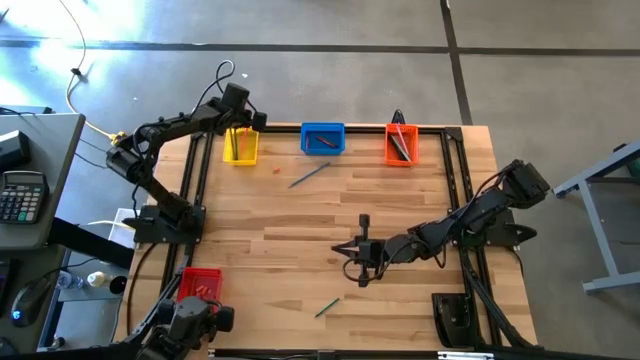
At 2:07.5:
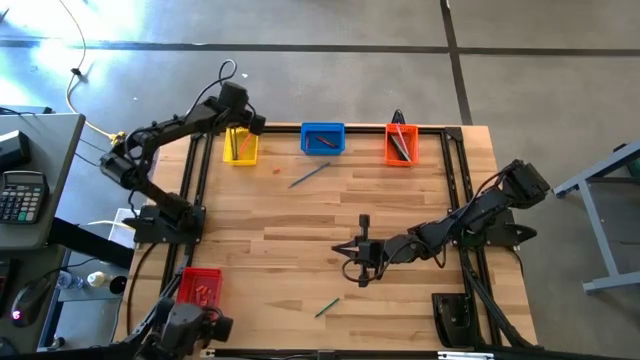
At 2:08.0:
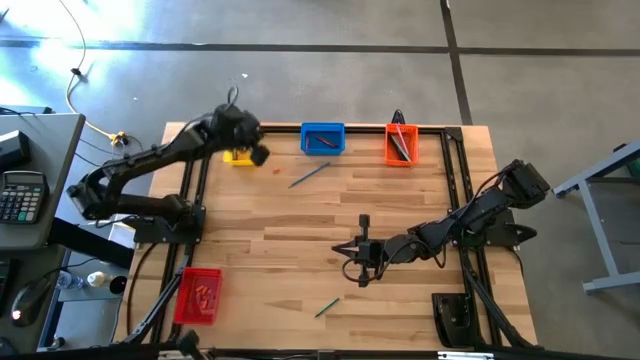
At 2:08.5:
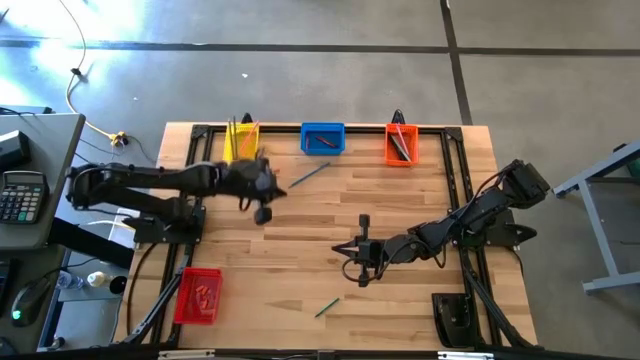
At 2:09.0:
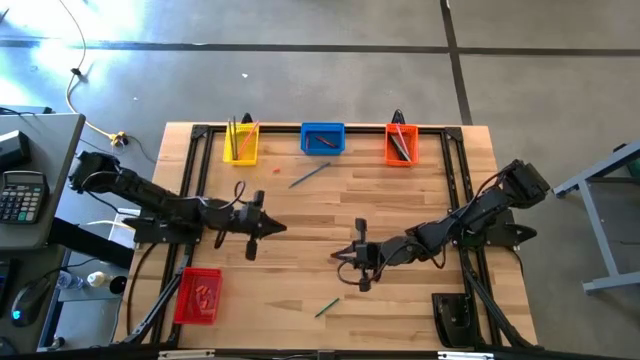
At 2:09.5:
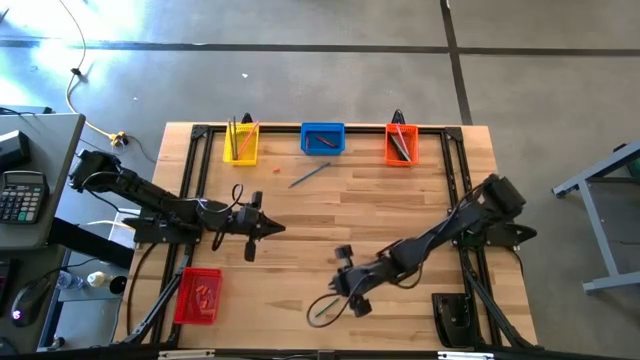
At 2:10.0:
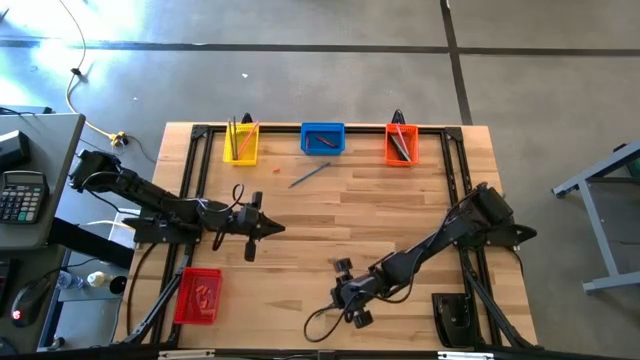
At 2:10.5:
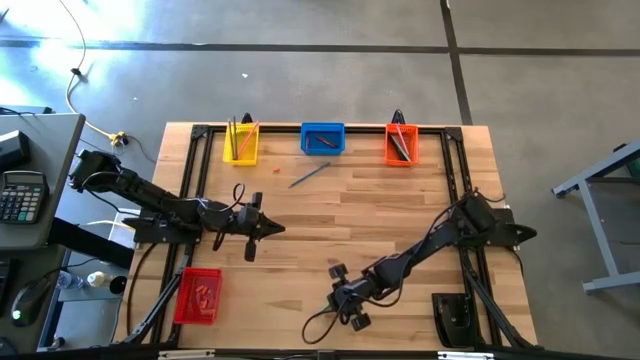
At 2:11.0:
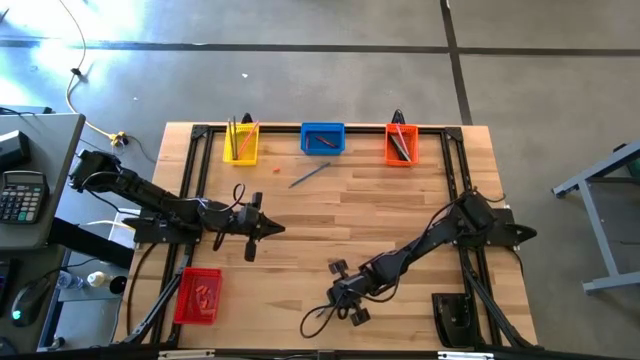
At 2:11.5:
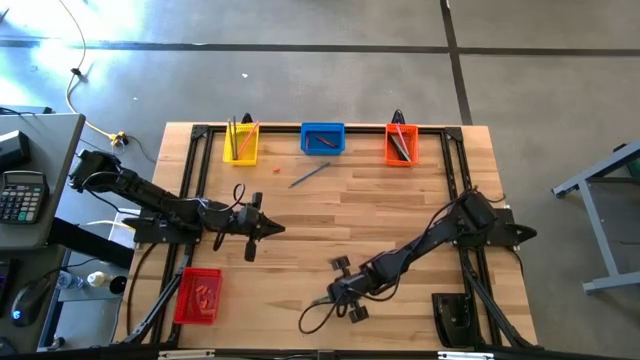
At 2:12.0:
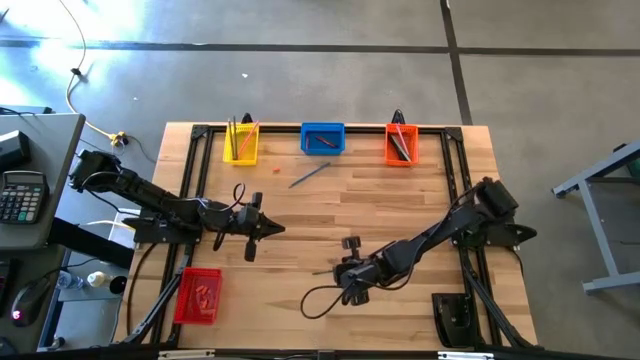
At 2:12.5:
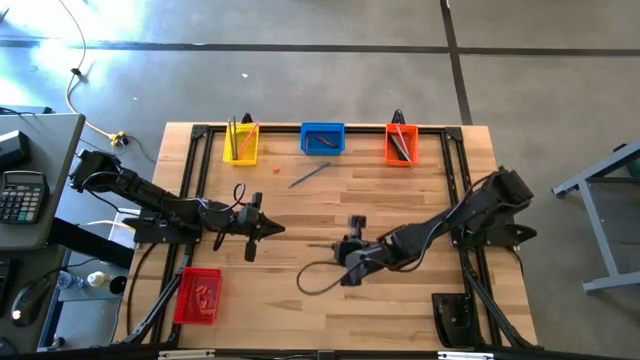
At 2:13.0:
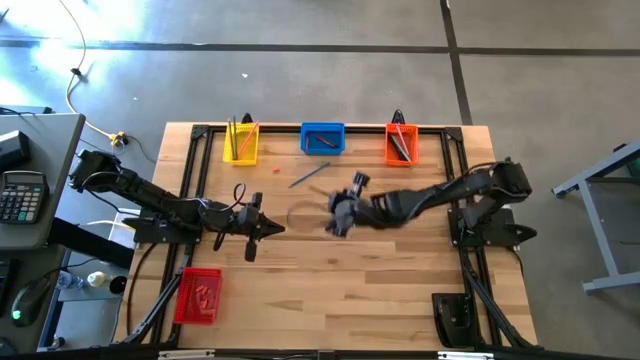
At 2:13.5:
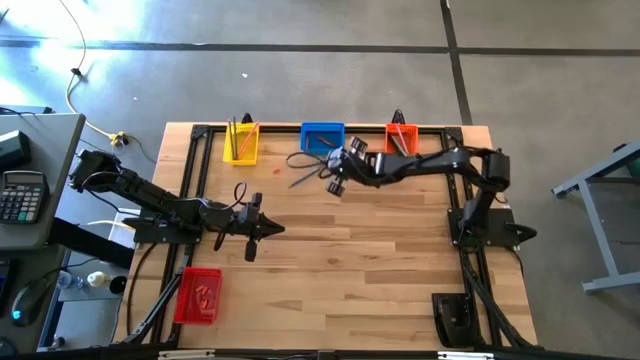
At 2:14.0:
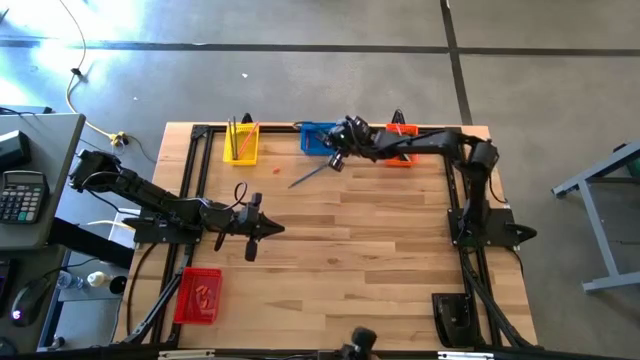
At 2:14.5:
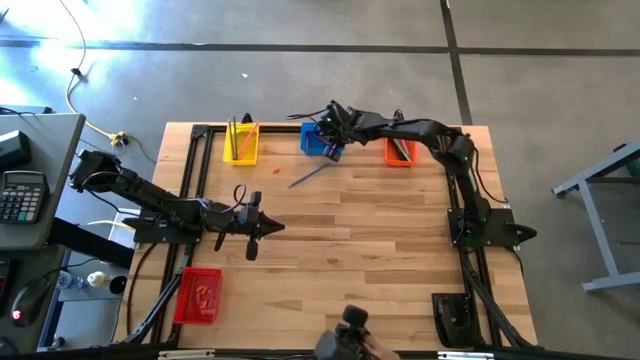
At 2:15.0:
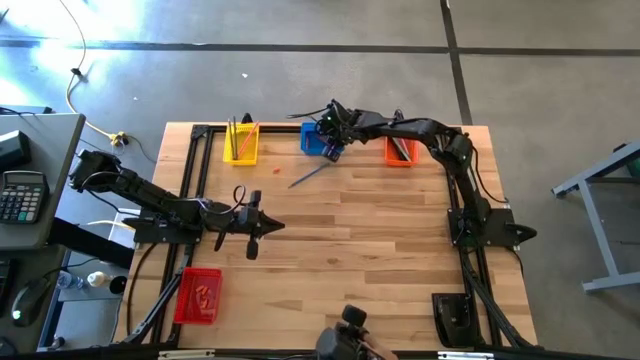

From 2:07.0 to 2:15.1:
Task: Sort crayons/erasers/pens/pencils in bins
Put the green crayon into the blue bin

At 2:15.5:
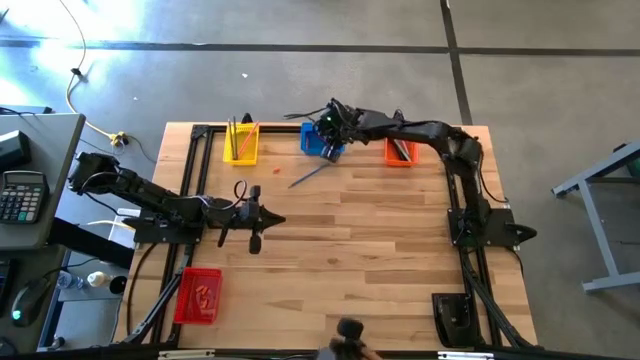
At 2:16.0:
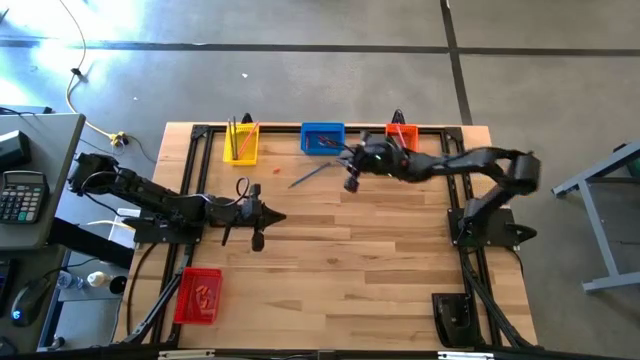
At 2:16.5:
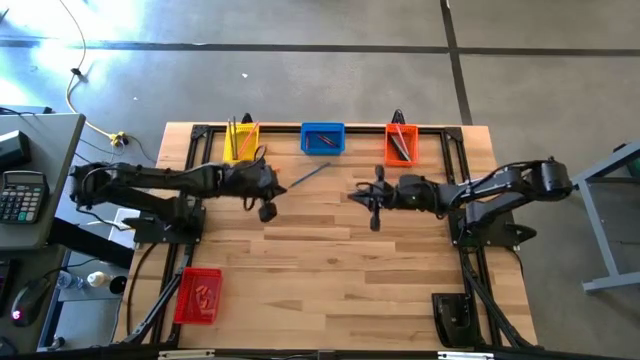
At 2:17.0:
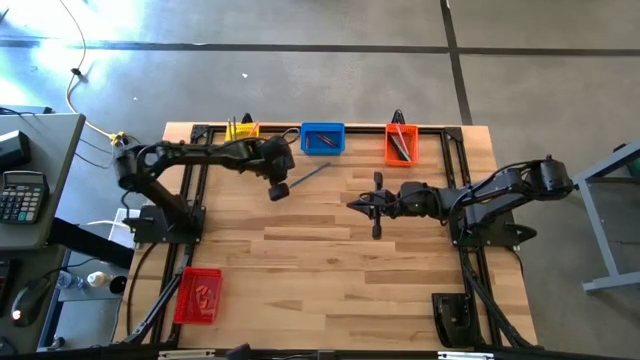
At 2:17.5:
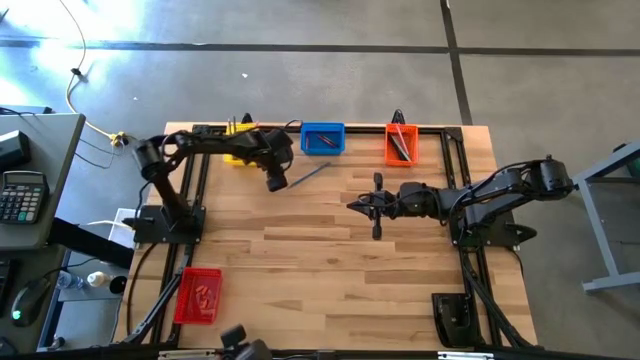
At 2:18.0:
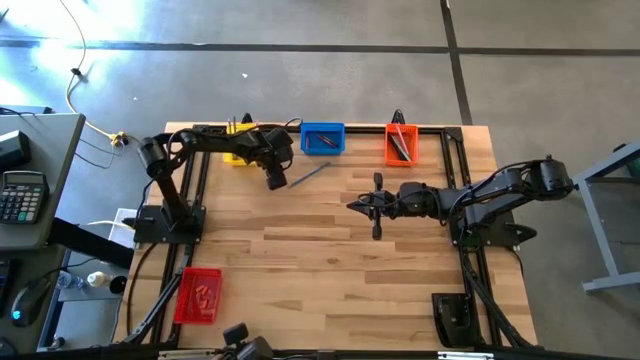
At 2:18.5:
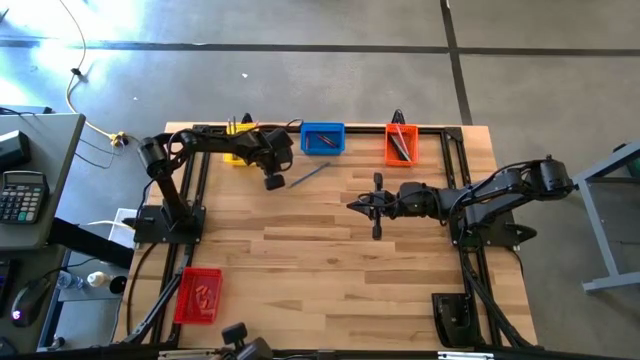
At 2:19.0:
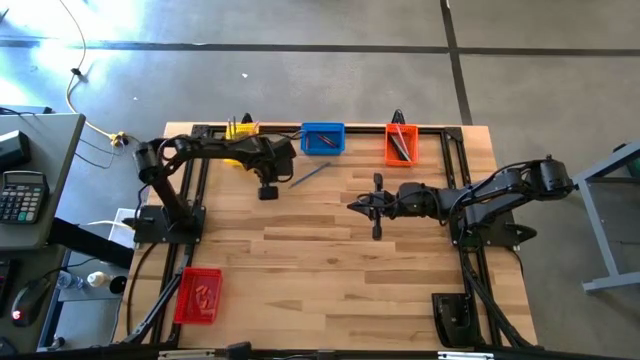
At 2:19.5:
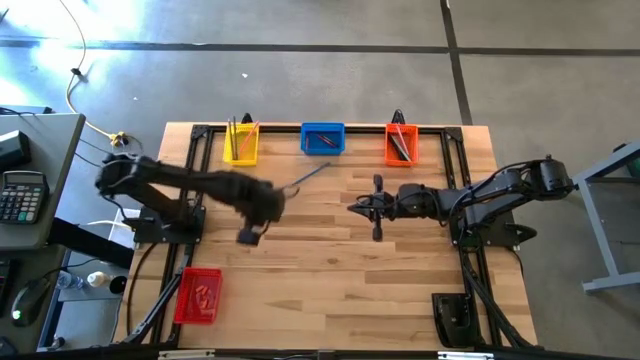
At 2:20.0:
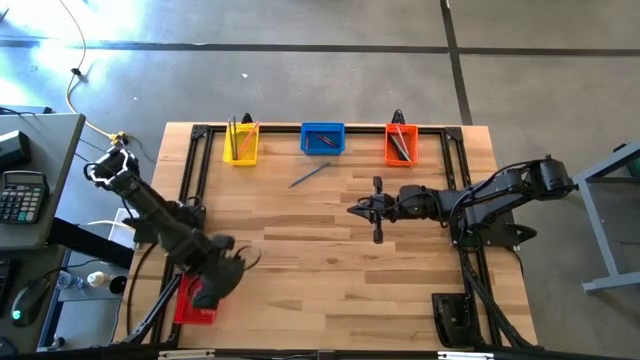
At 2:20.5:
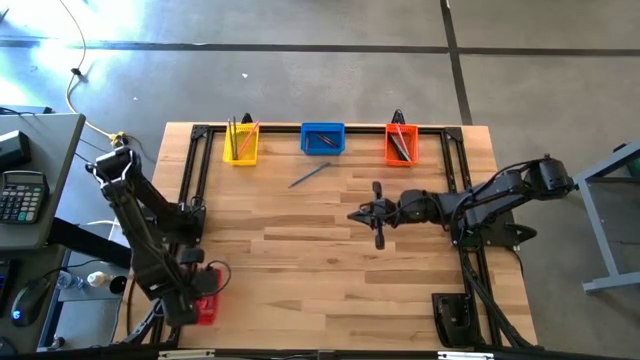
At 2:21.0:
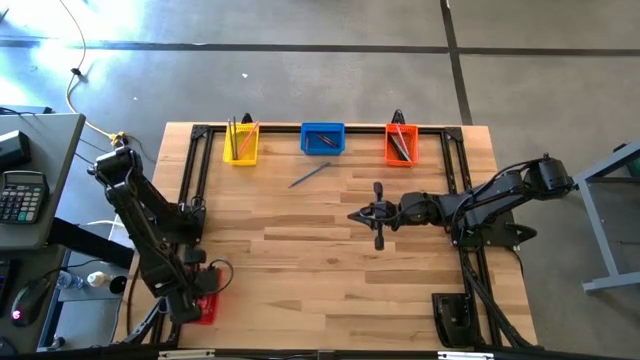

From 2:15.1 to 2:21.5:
Put the orange eraser into the red bin

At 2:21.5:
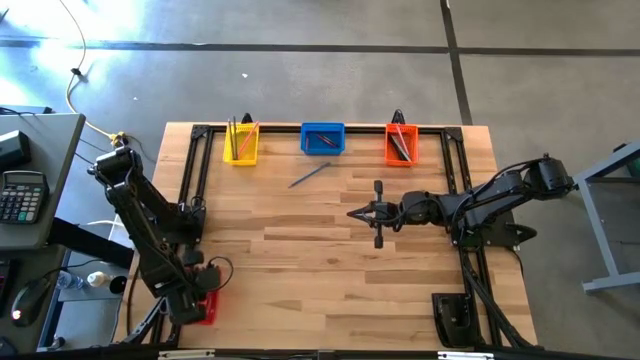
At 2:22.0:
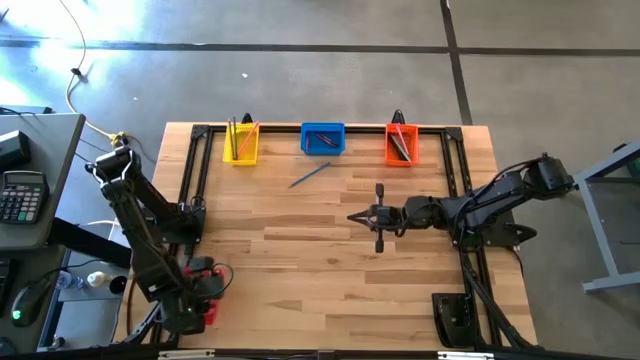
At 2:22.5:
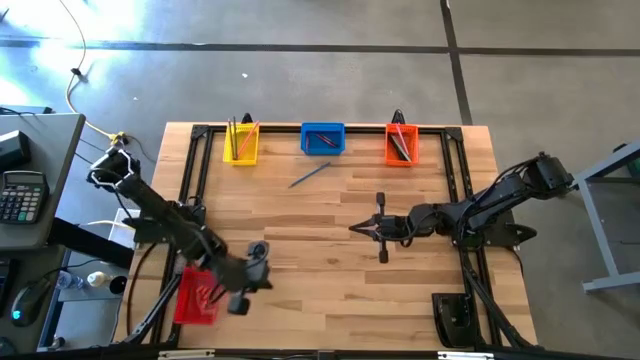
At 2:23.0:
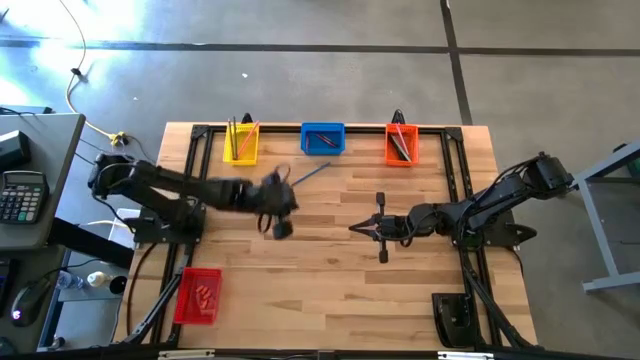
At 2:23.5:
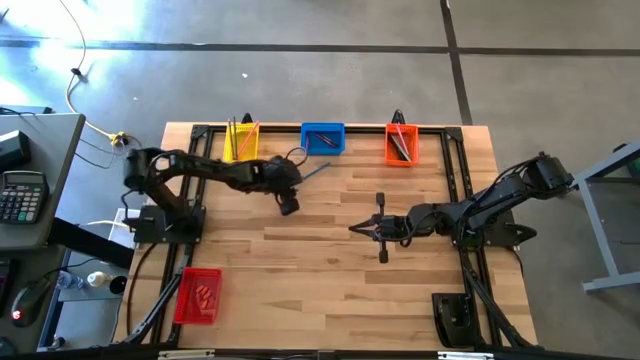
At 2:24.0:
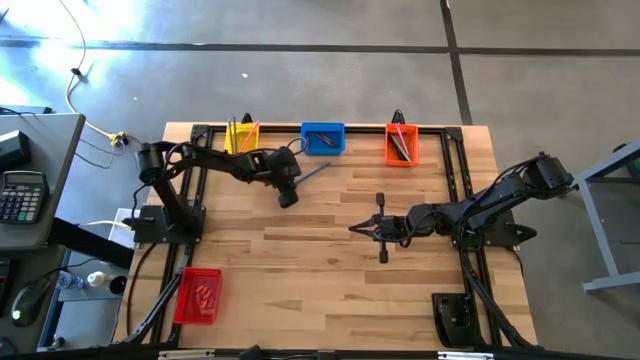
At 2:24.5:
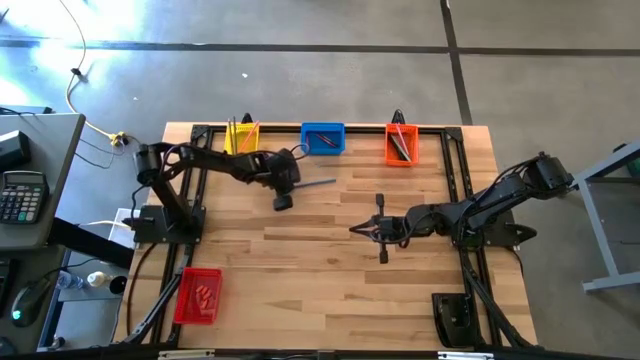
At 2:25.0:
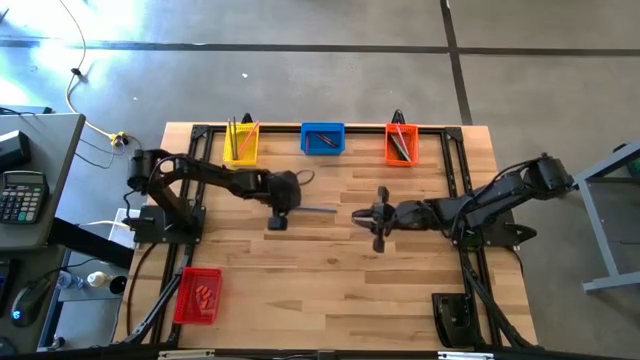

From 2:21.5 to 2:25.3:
Put the blue colored pencil into the yellow bin

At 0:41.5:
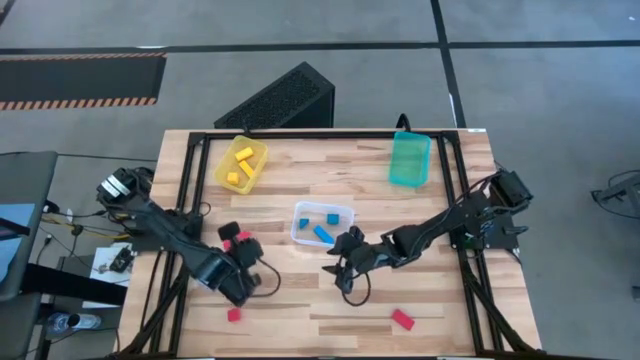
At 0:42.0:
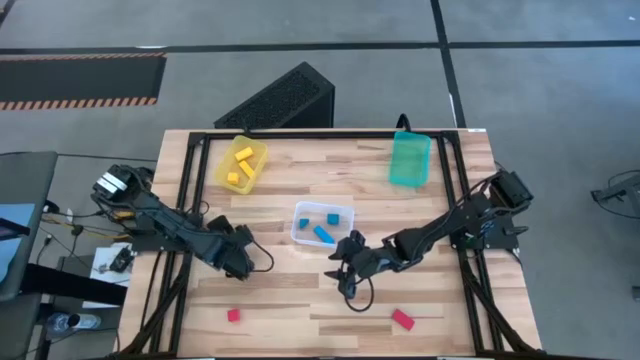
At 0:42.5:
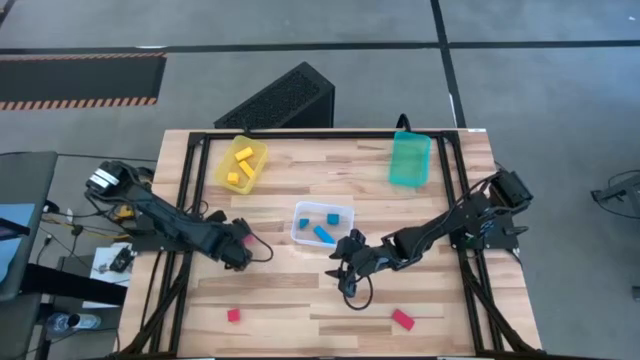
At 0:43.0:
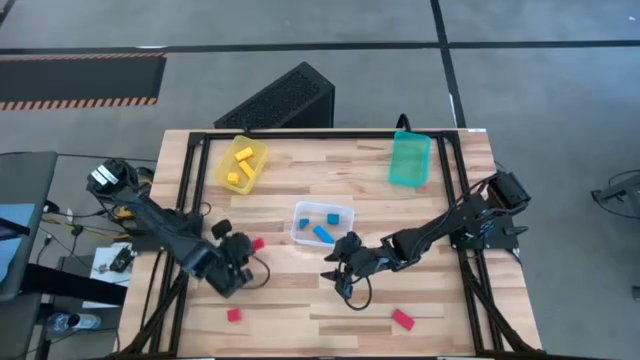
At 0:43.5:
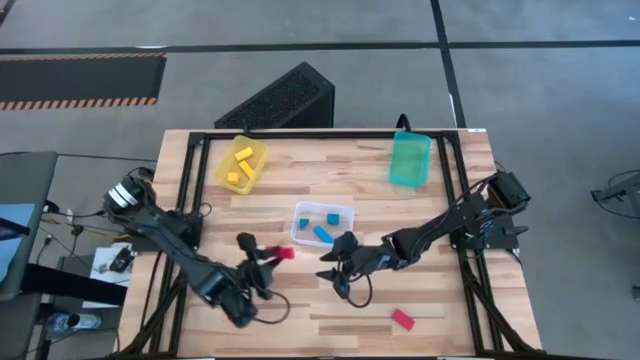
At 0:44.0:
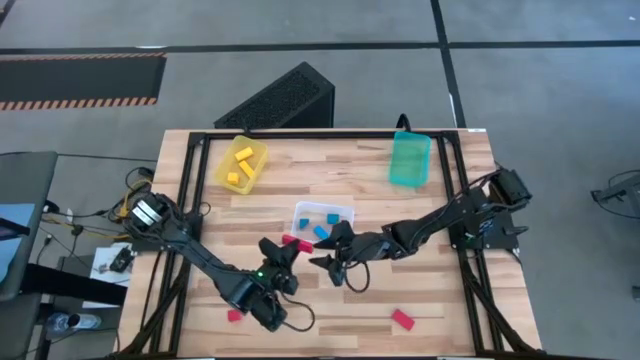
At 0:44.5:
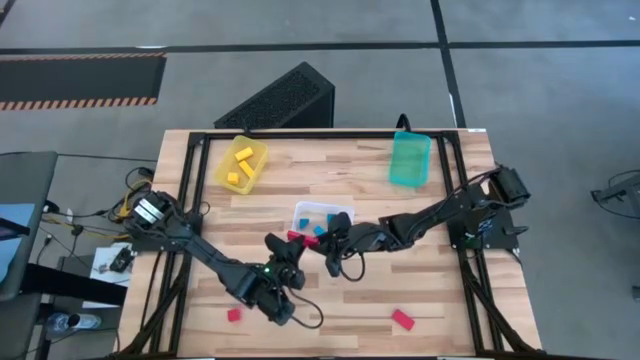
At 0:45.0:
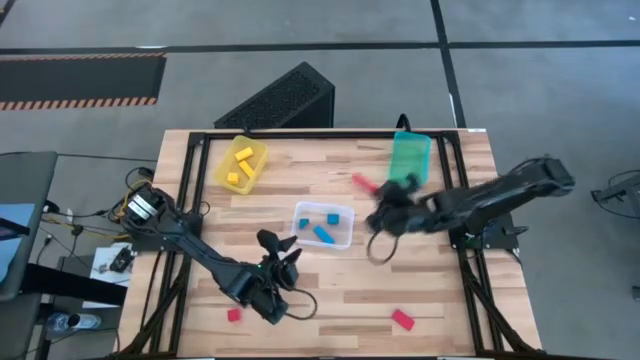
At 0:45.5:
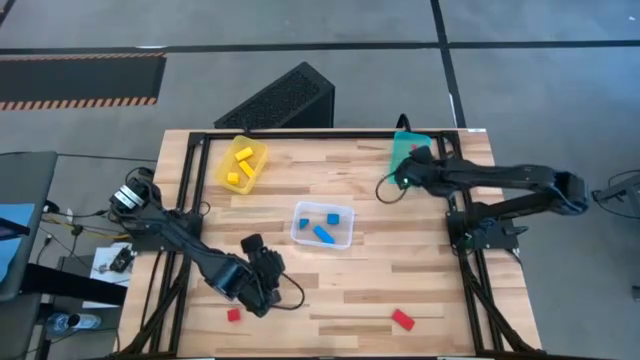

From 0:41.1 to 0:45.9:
Task: Sort & place blocks by color
Put the top red block into the green bin
